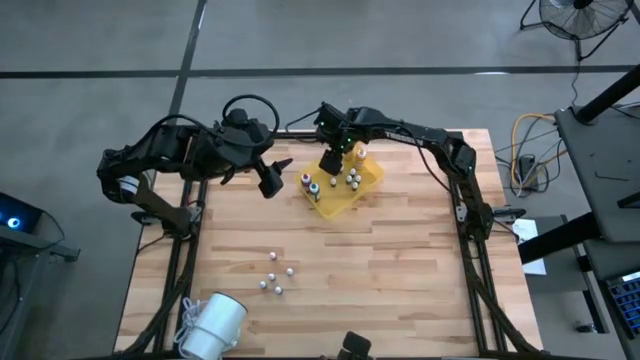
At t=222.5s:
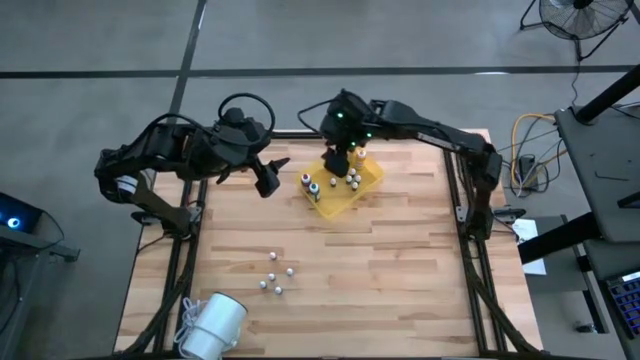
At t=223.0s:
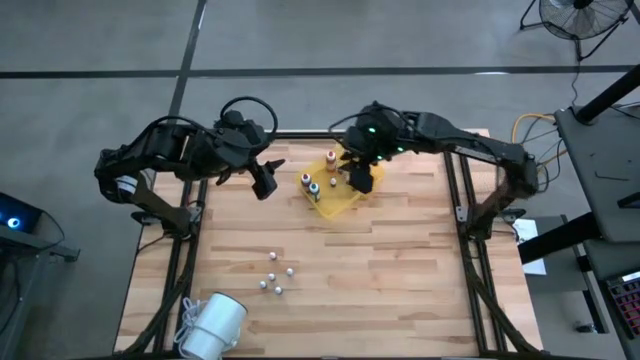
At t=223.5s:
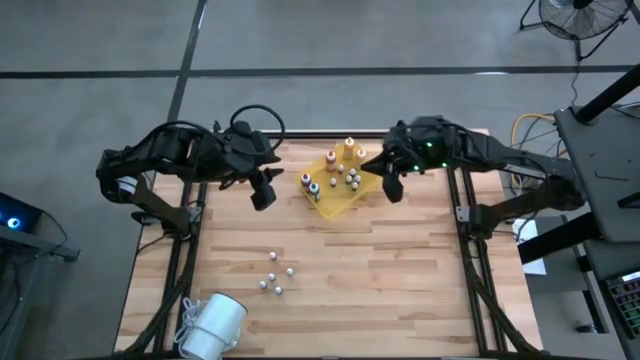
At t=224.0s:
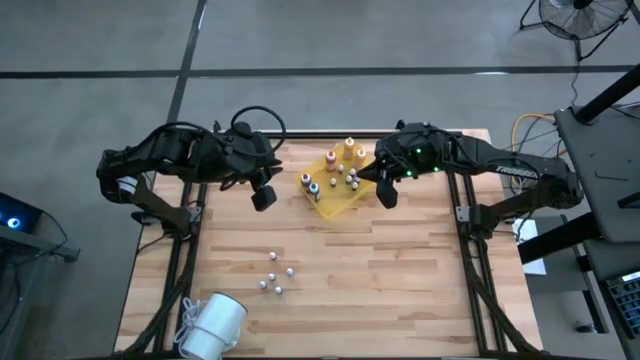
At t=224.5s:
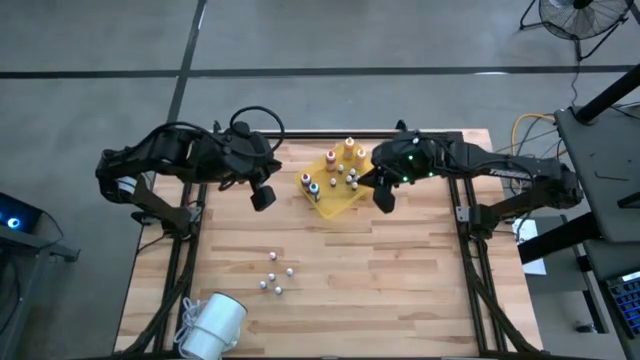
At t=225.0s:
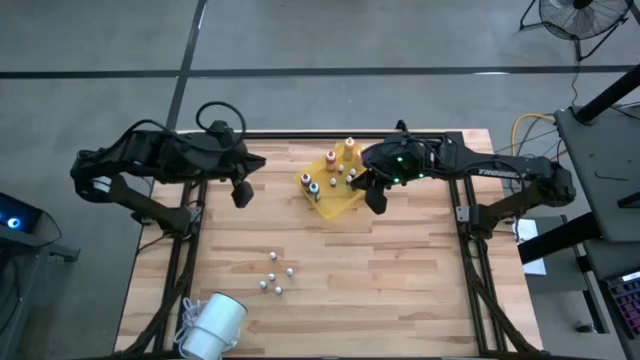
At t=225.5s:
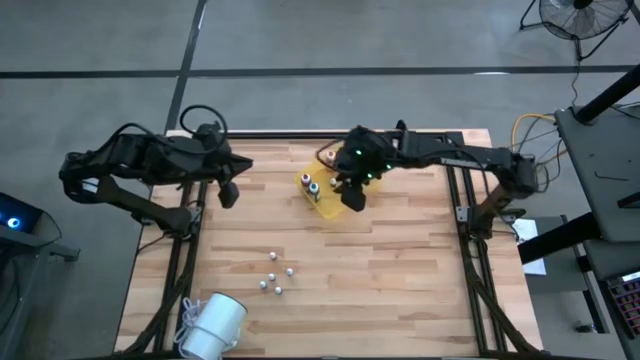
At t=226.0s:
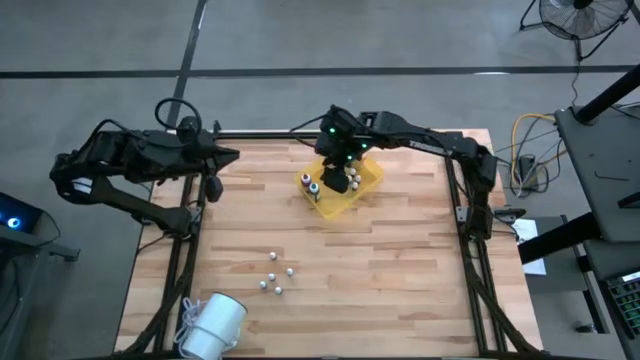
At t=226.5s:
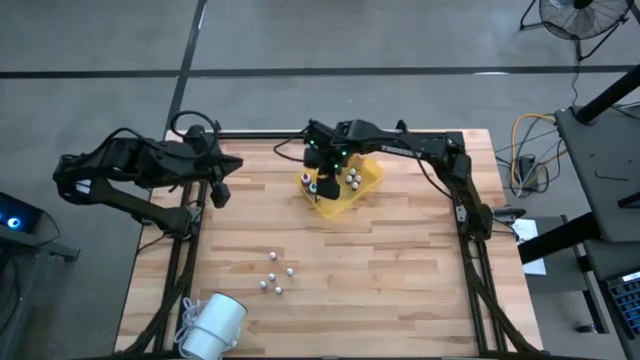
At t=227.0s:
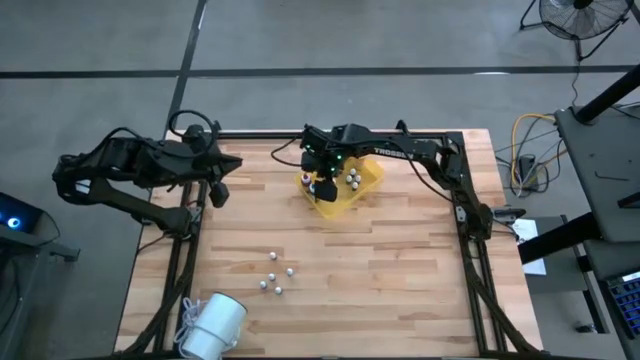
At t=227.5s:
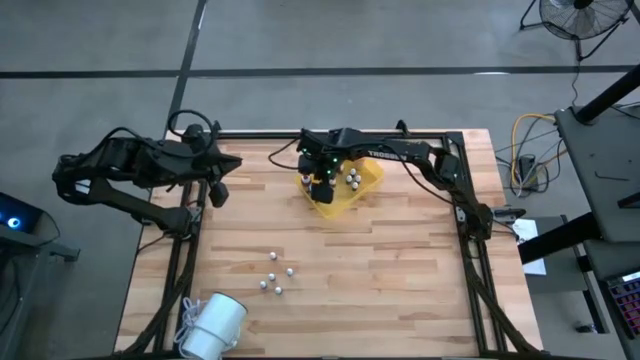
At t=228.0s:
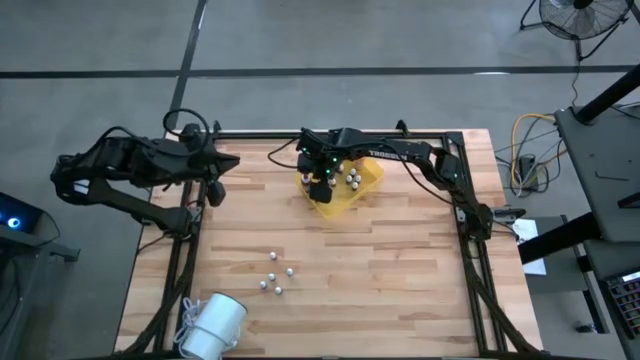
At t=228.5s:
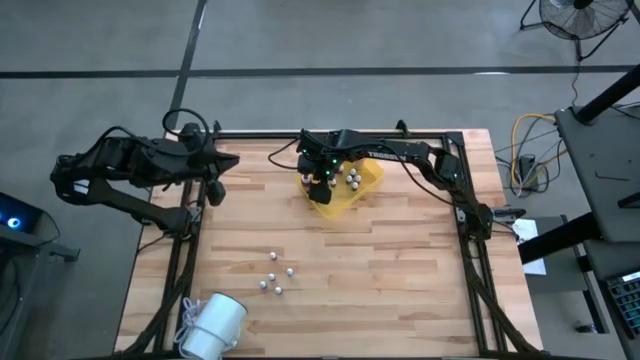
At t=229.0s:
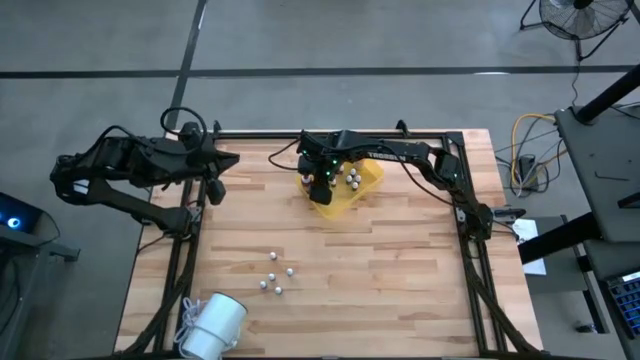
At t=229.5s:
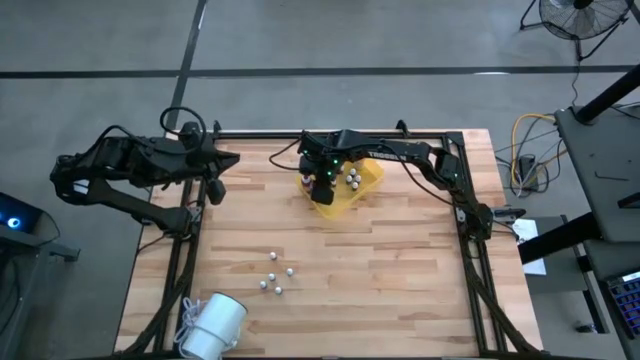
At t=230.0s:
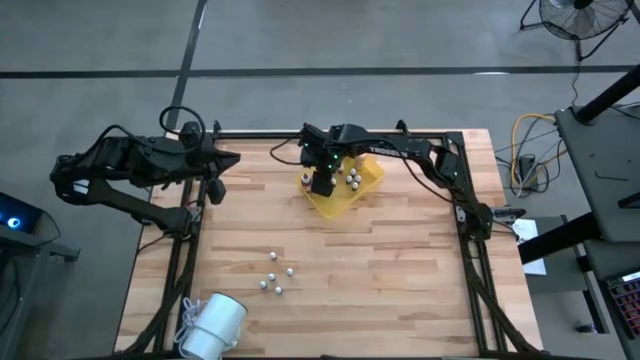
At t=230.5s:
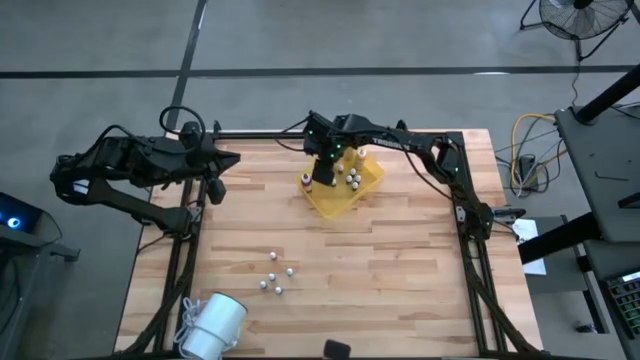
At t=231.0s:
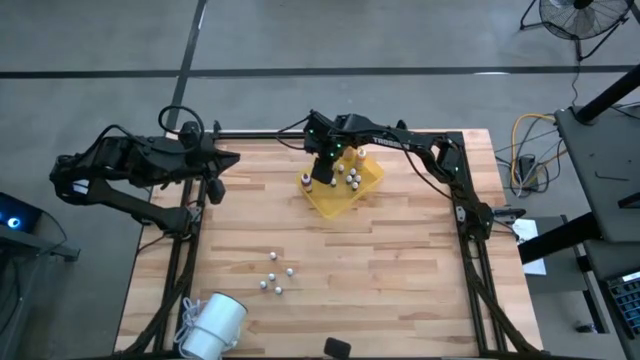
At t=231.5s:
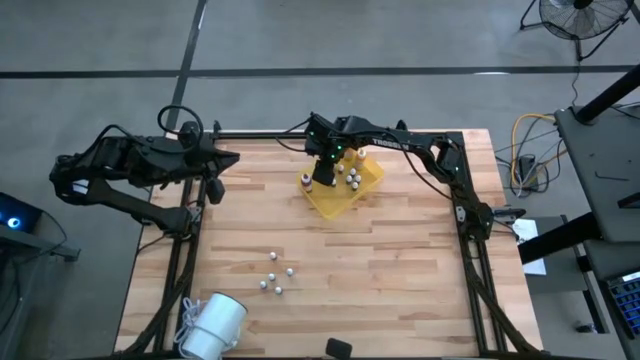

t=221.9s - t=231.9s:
Task: Pick & Place food coloring
Adjust the large green food coloring bottle in the yellow bin
